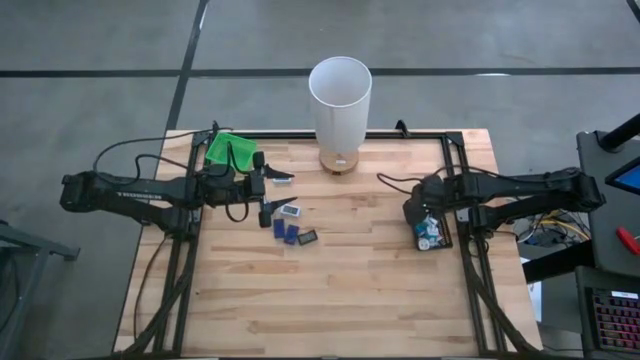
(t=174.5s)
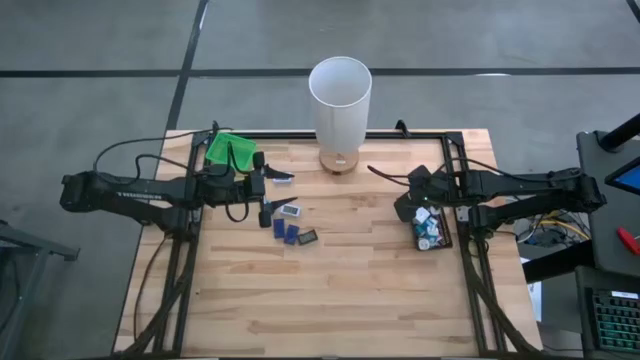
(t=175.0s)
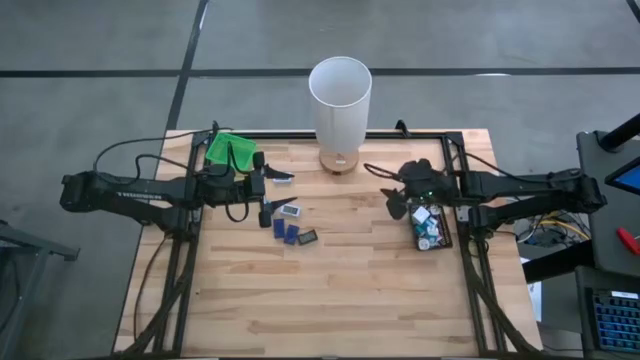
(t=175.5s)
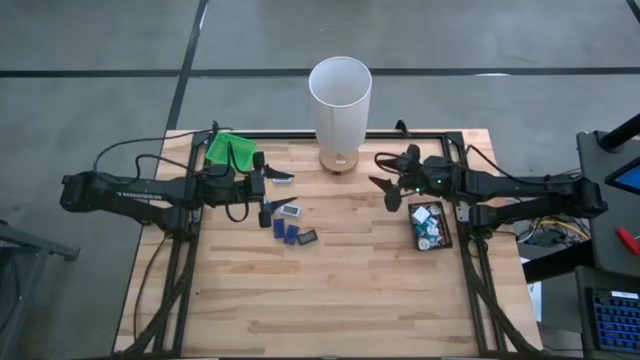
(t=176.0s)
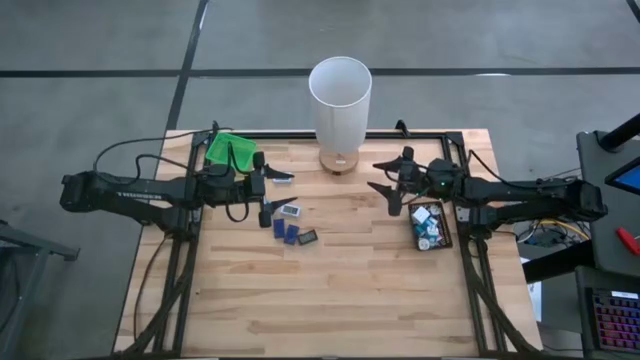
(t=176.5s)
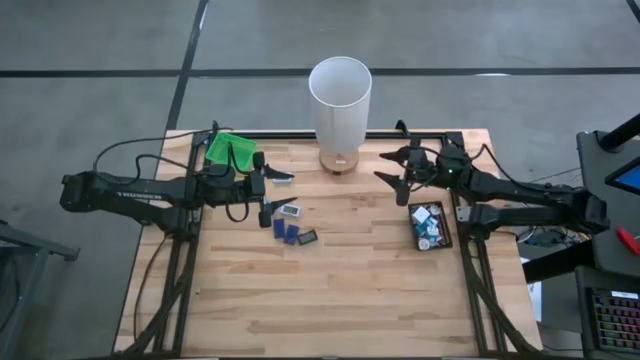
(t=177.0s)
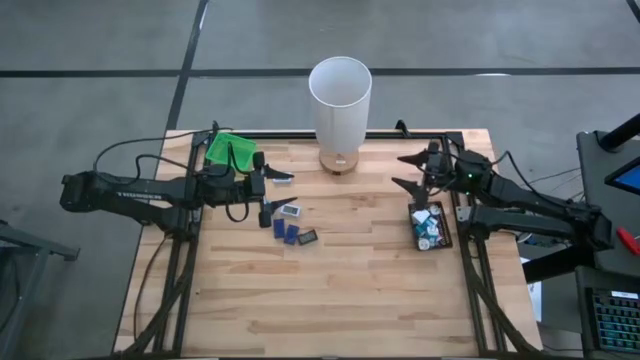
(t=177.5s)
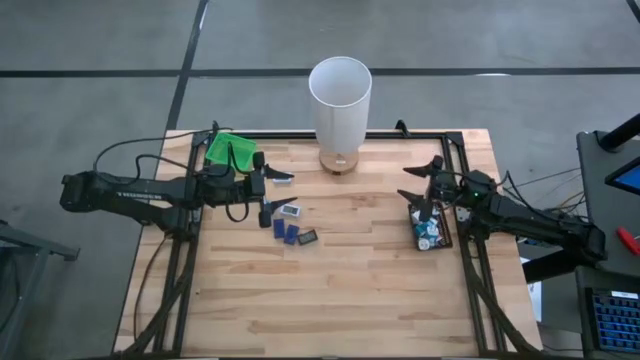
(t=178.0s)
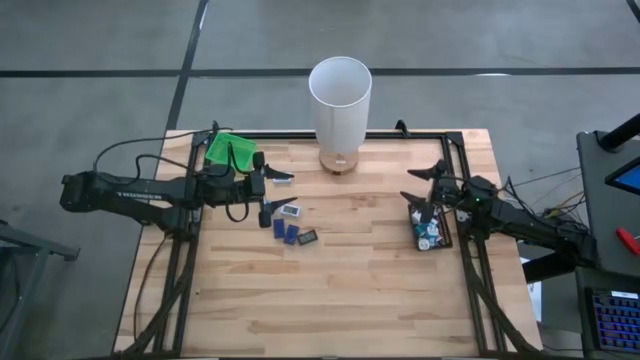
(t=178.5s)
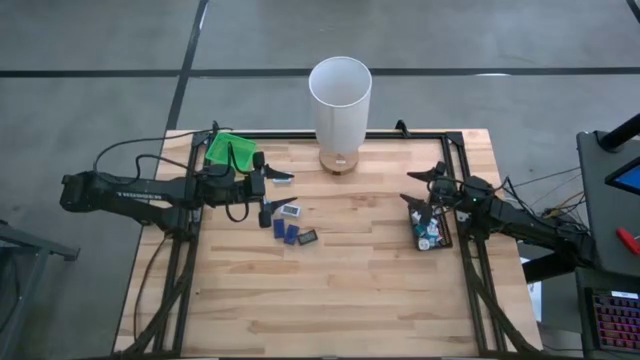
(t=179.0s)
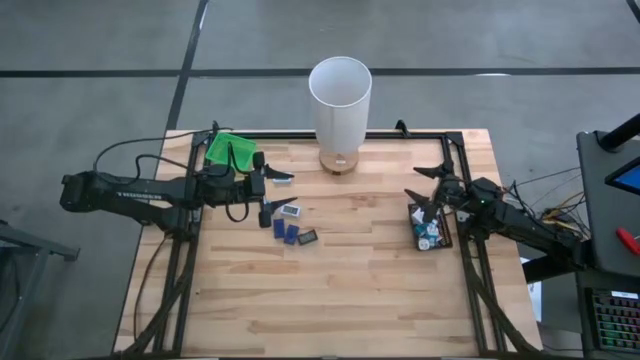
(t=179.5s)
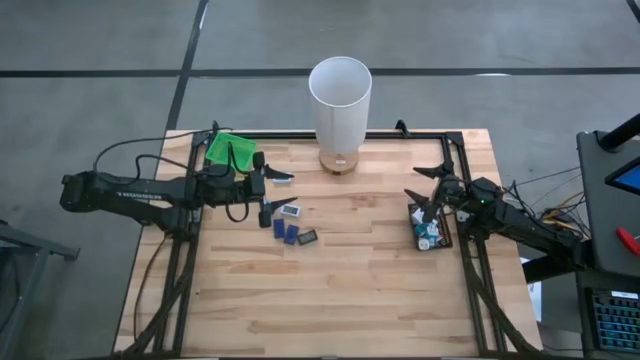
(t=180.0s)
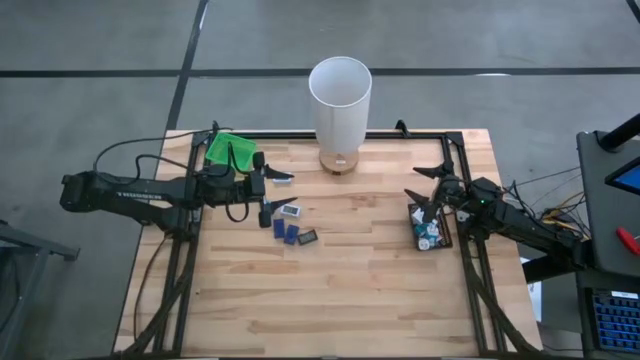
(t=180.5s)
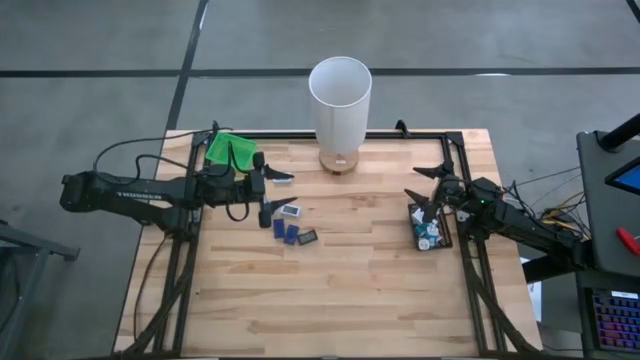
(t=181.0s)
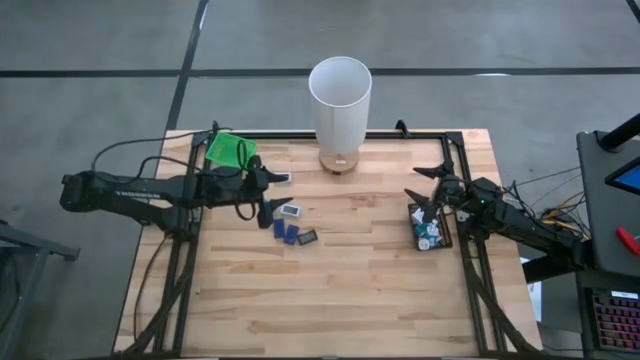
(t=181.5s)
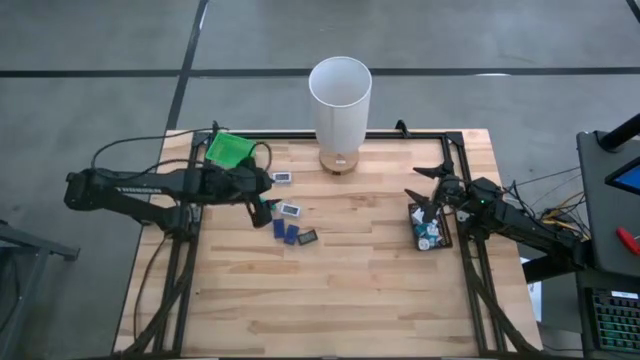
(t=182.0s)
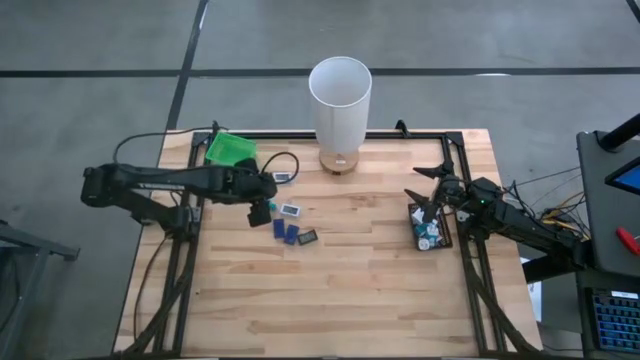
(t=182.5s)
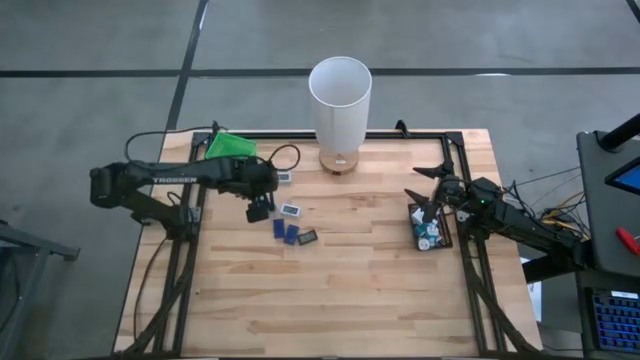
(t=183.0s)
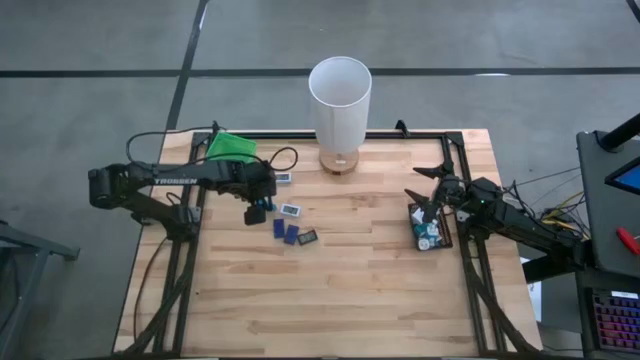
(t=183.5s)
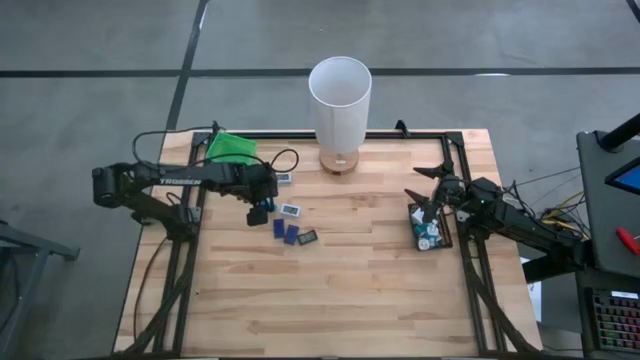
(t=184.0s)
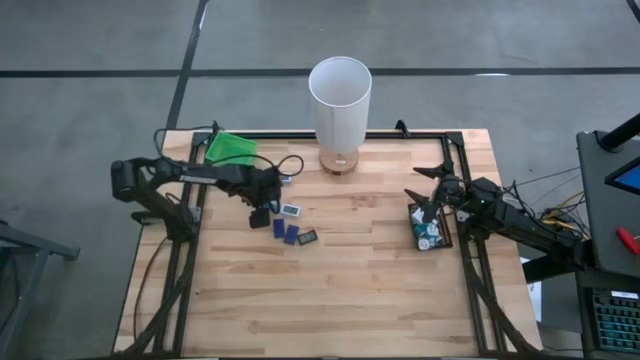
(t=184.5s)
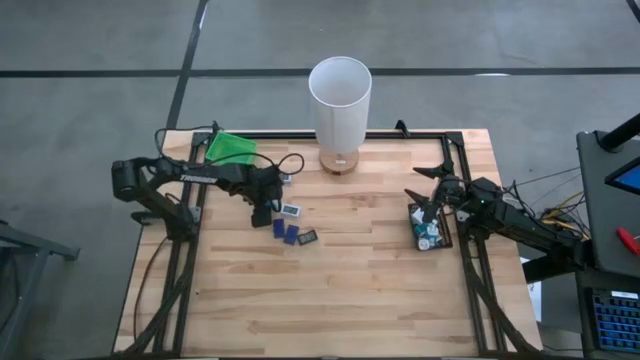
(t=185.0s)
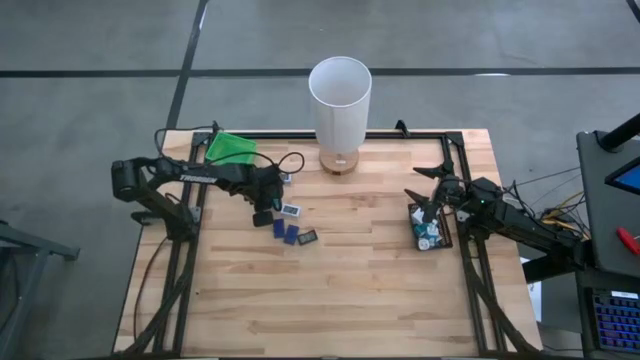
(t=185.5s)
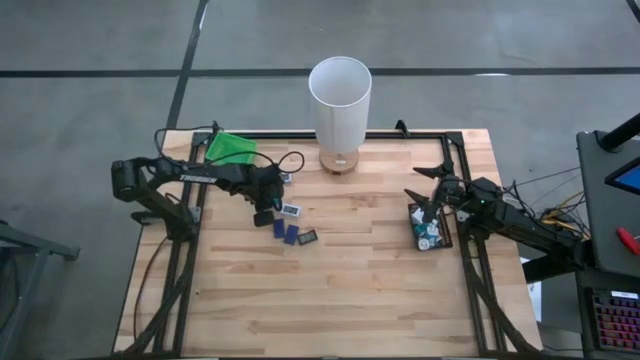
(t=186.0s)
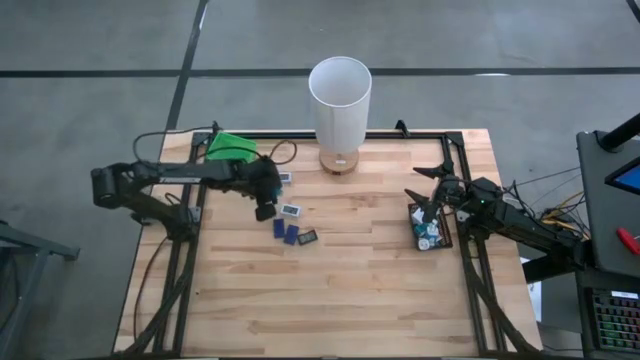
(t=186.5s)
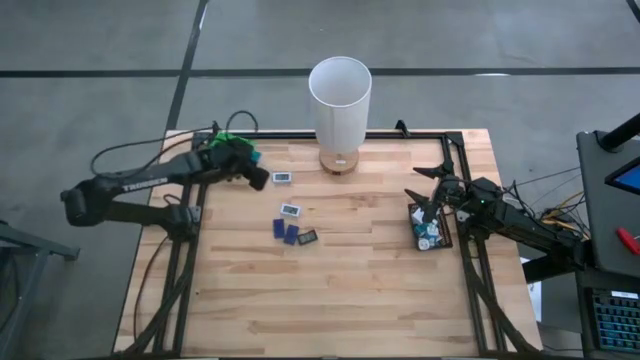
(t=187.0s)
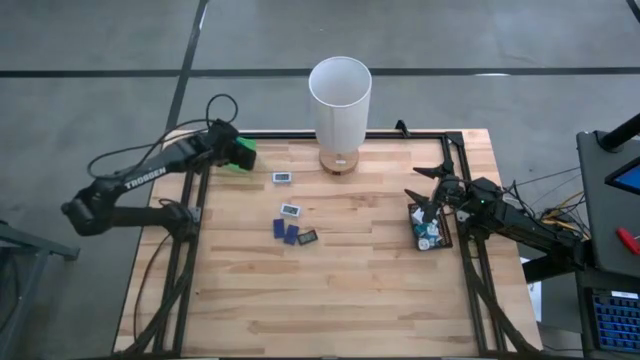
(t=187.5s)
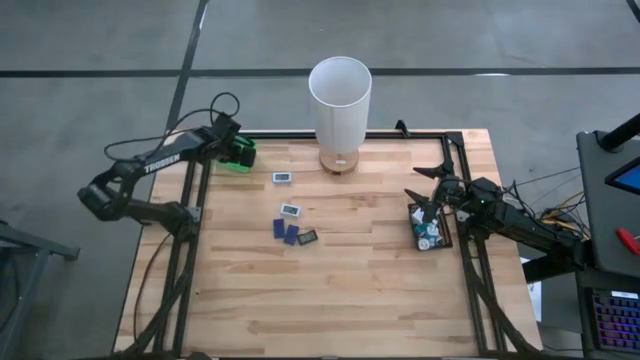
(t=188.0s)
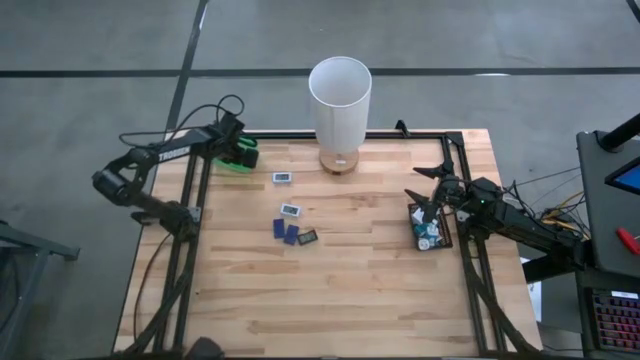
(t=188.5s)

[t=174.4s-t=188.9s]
Task: Pick & Place Office items
Put the light blue digital clock into the green bin

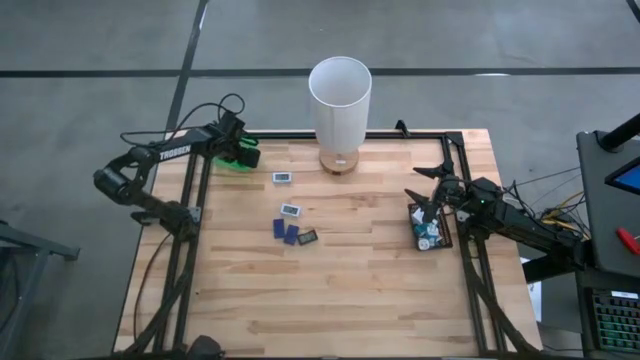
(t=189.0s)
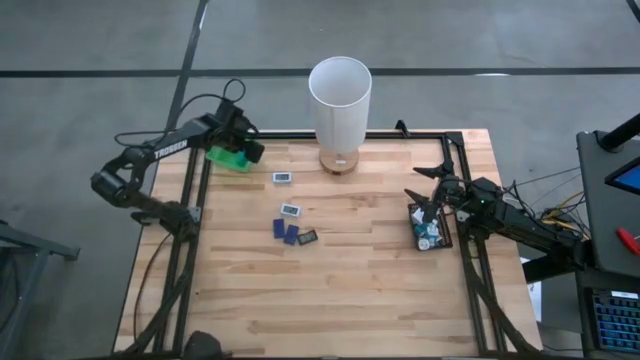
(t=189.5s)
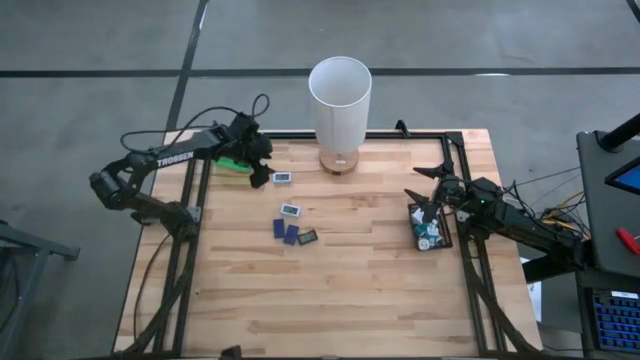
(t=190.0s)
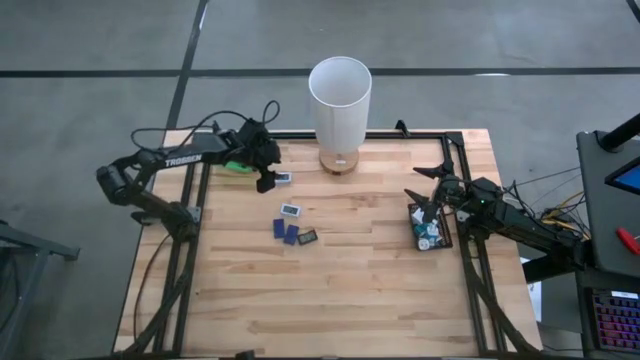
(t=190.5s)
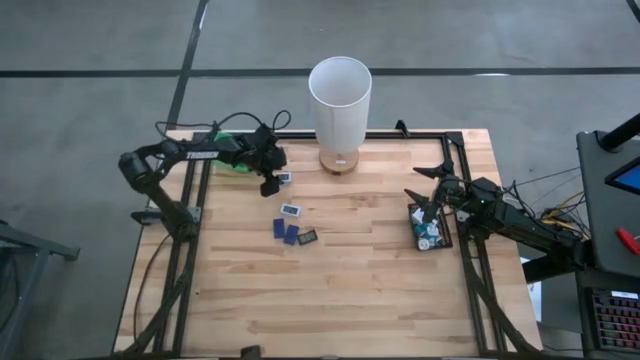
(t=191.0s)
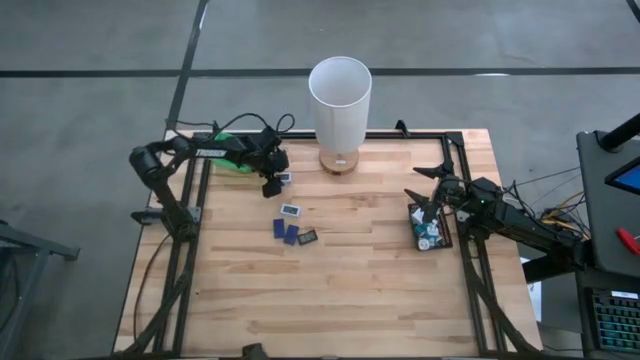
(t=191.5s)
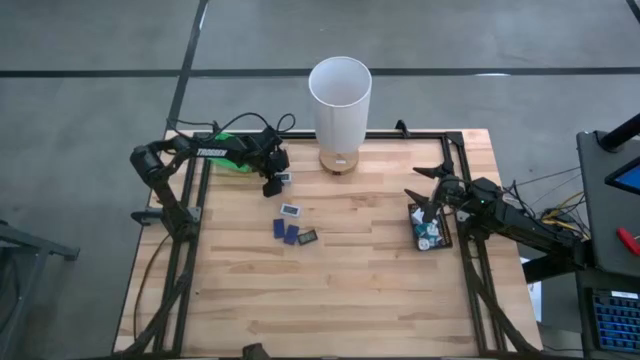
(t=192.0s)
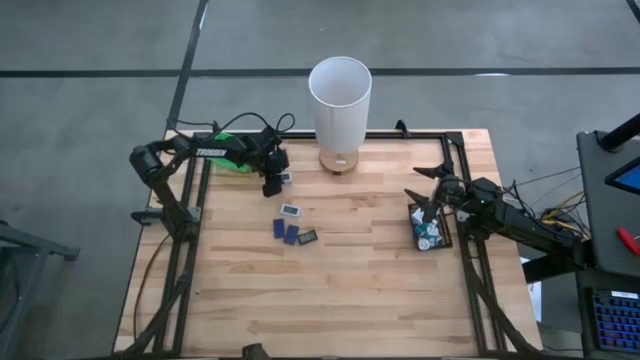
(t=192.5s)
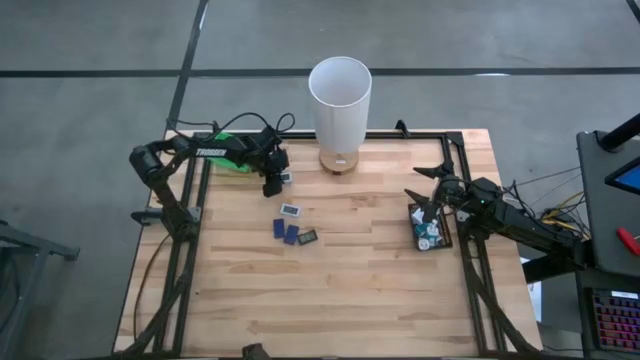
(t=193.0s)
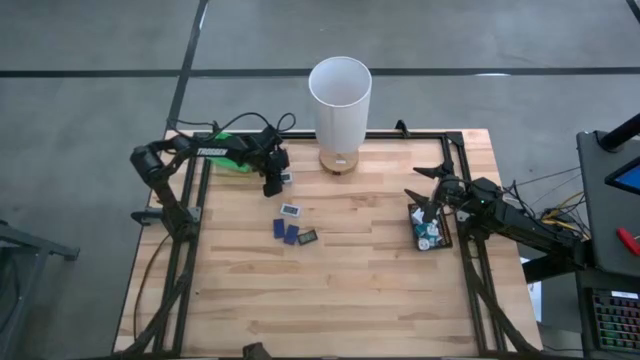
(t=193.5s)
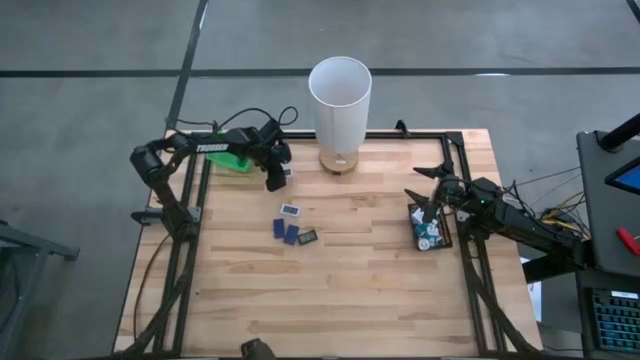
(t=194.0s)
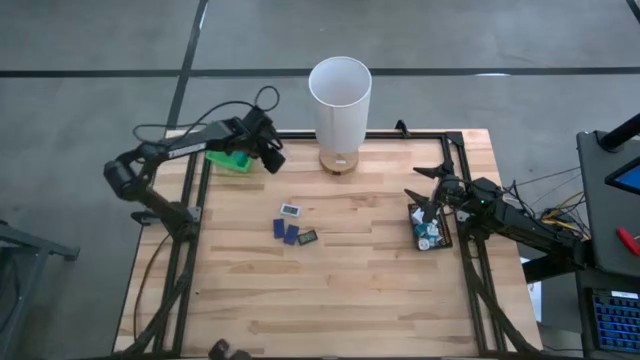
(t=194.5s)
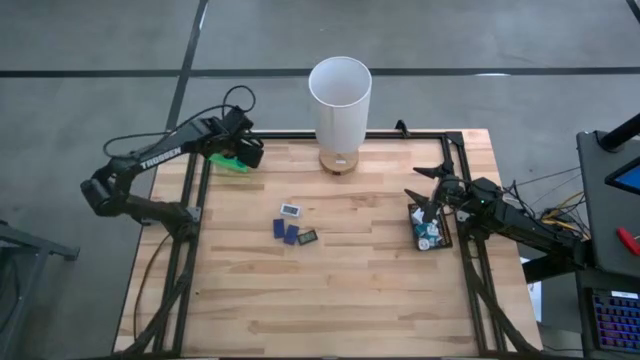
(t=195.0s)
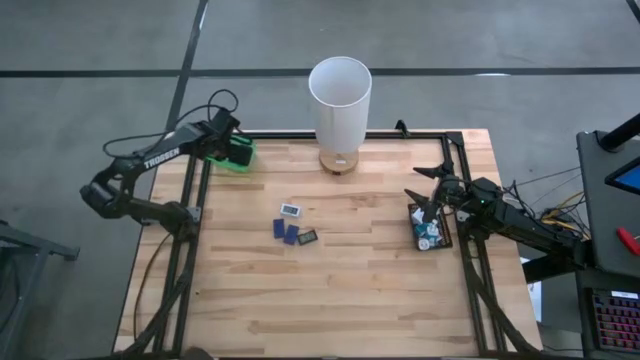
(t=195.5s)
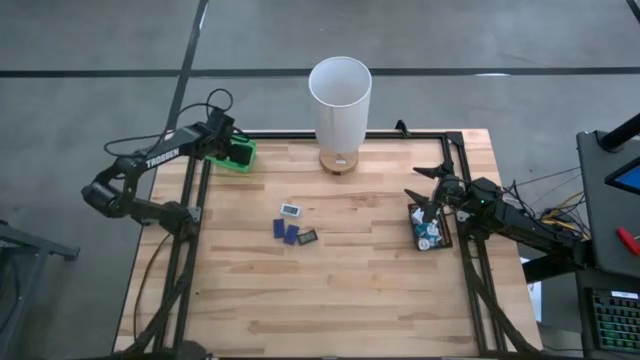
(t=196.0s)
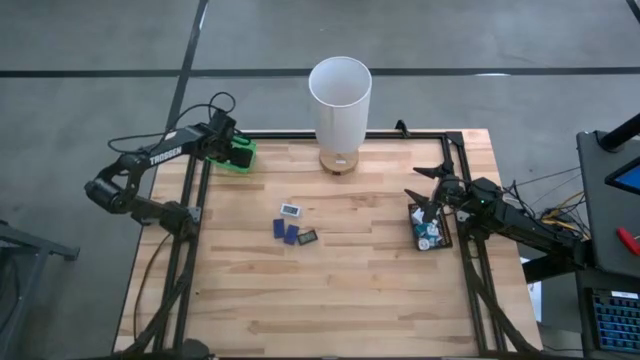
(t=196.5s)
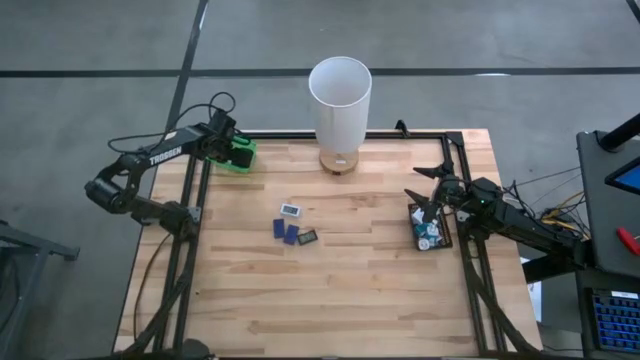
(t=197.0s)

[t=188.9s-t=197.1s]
Put the top white digital clock into the green bin
